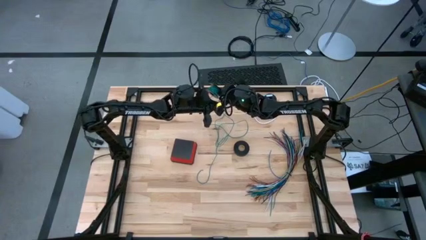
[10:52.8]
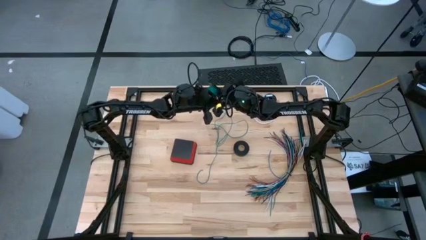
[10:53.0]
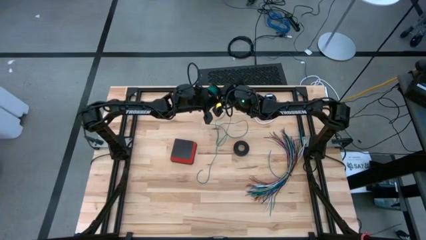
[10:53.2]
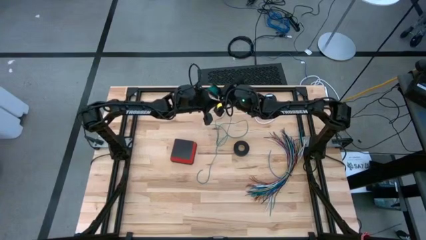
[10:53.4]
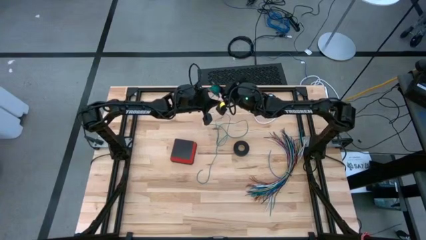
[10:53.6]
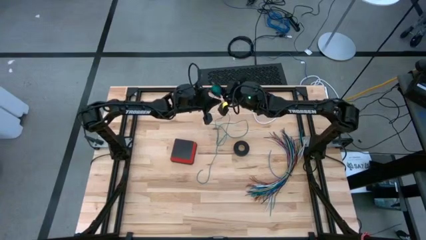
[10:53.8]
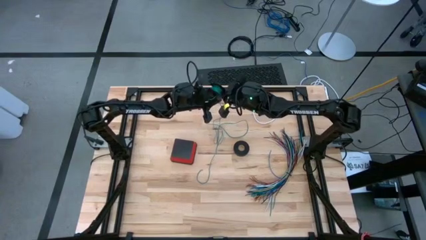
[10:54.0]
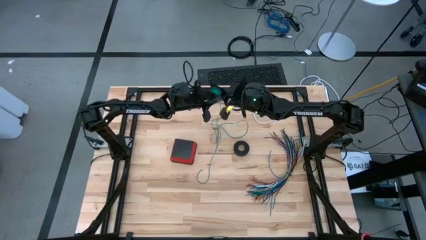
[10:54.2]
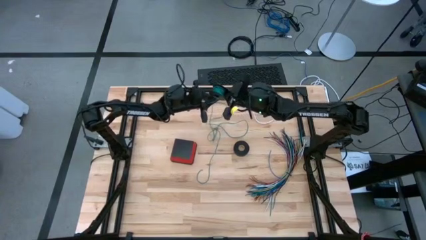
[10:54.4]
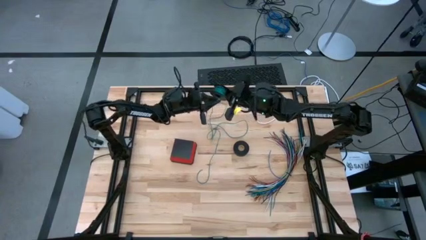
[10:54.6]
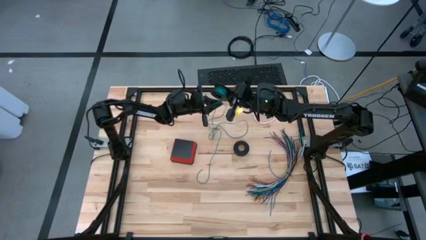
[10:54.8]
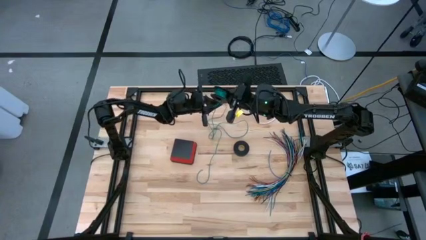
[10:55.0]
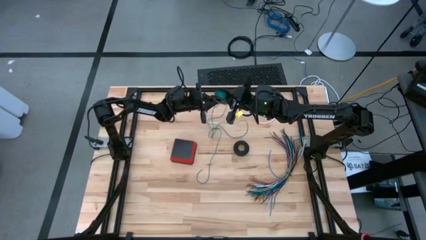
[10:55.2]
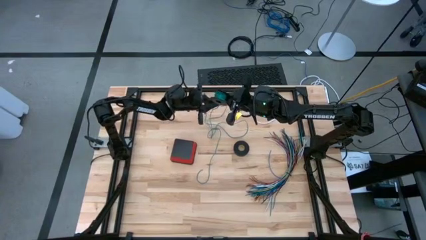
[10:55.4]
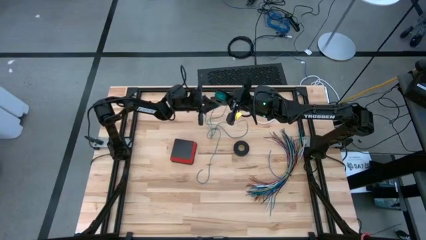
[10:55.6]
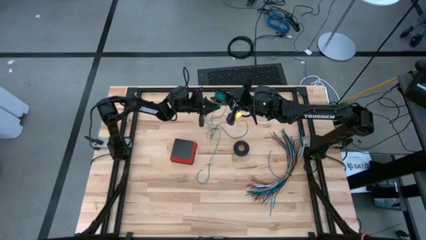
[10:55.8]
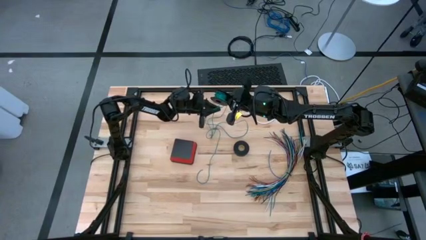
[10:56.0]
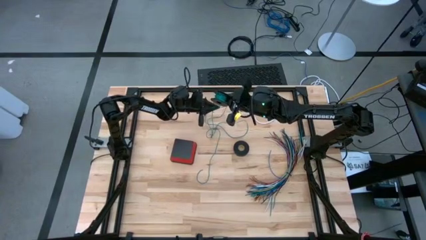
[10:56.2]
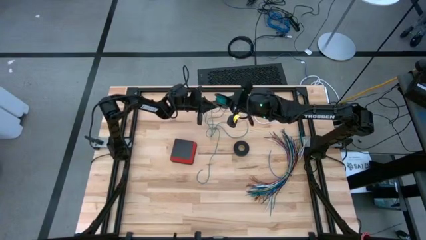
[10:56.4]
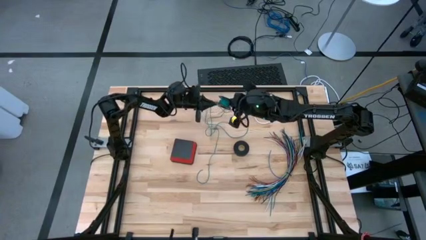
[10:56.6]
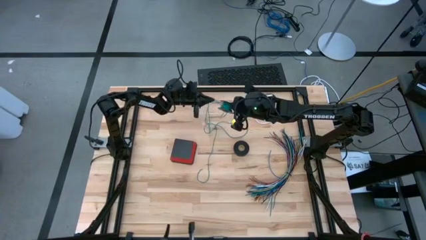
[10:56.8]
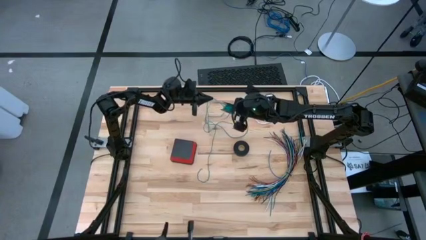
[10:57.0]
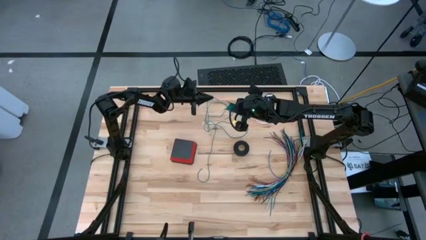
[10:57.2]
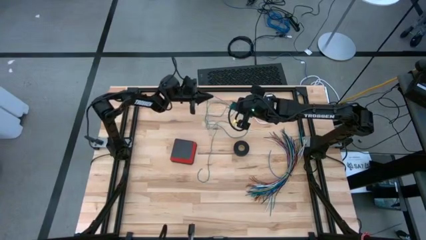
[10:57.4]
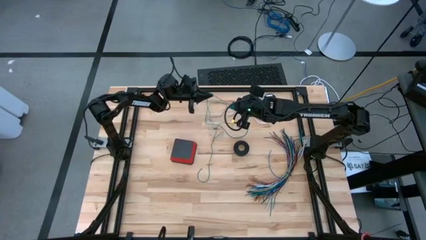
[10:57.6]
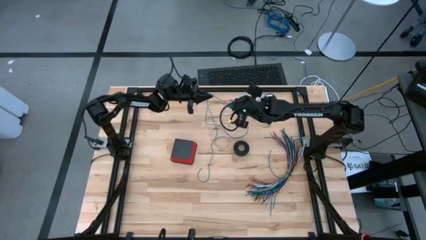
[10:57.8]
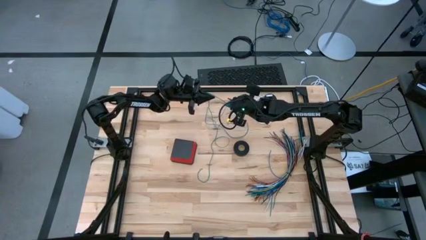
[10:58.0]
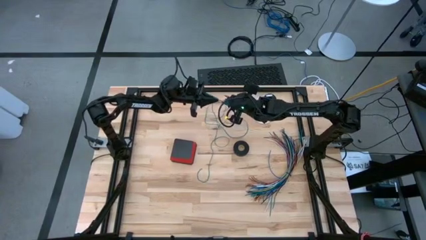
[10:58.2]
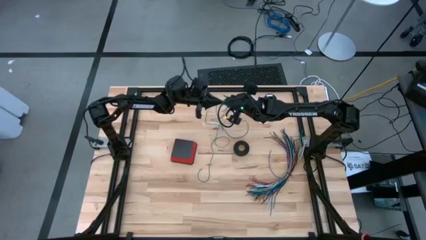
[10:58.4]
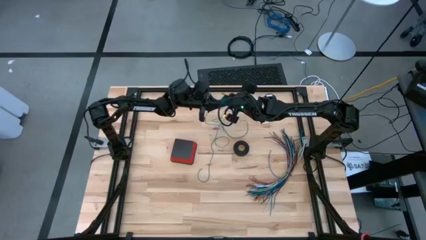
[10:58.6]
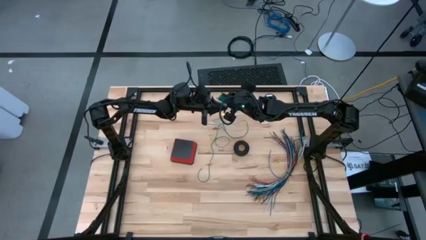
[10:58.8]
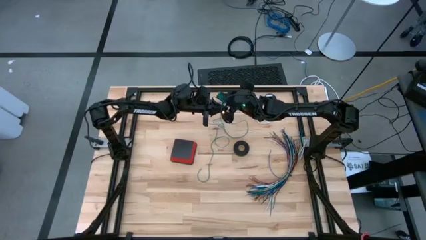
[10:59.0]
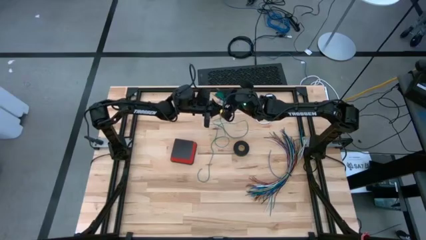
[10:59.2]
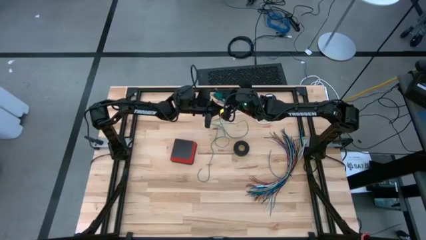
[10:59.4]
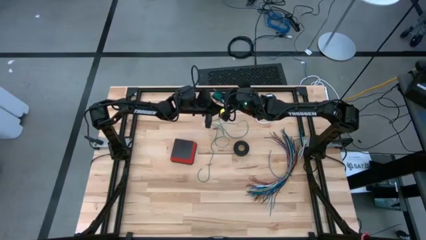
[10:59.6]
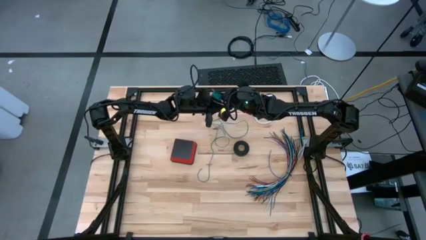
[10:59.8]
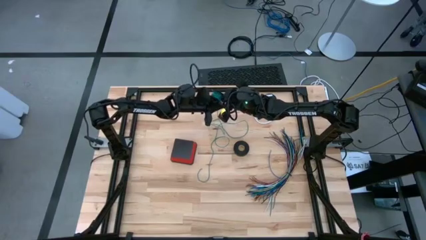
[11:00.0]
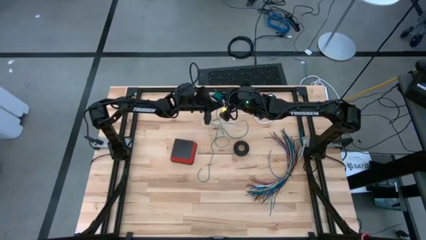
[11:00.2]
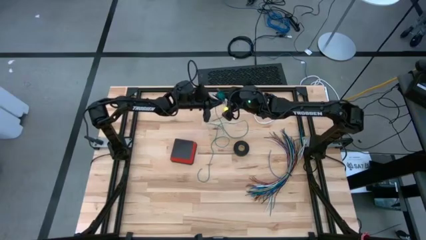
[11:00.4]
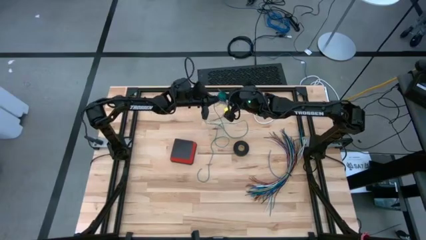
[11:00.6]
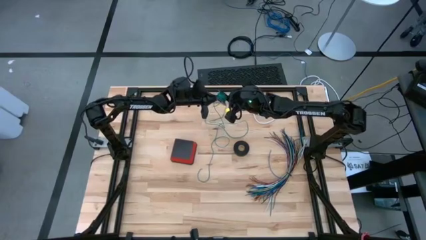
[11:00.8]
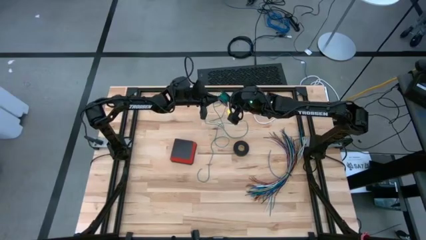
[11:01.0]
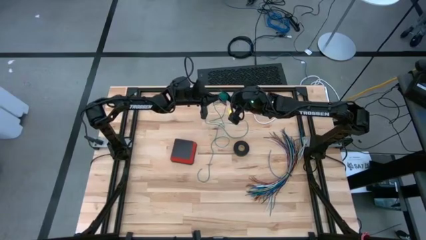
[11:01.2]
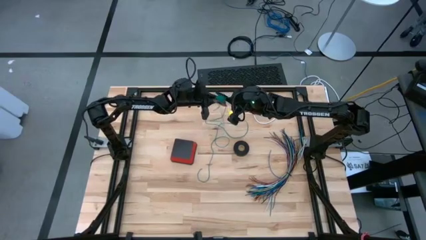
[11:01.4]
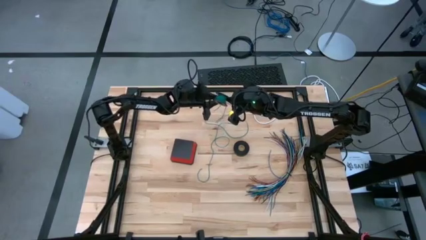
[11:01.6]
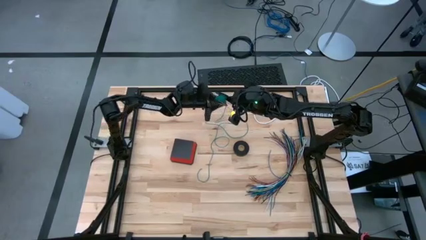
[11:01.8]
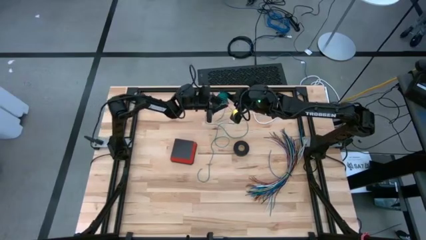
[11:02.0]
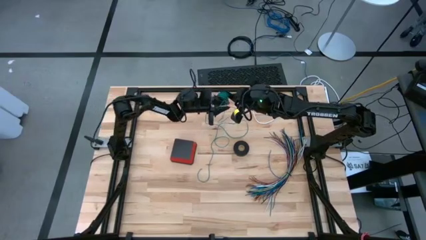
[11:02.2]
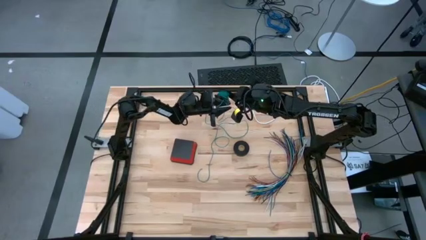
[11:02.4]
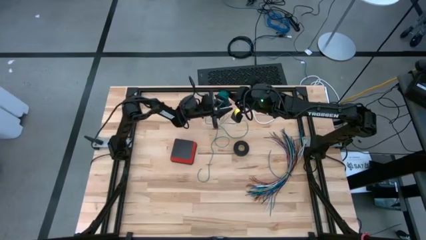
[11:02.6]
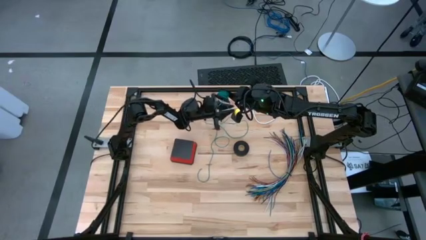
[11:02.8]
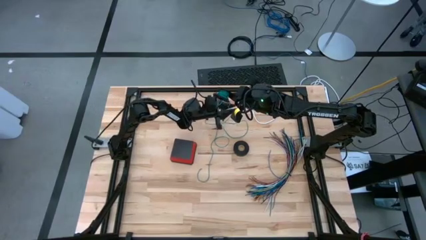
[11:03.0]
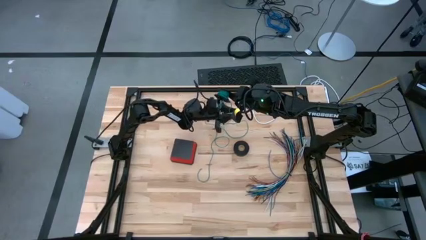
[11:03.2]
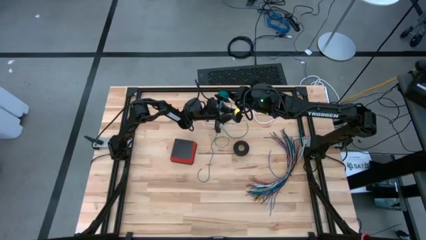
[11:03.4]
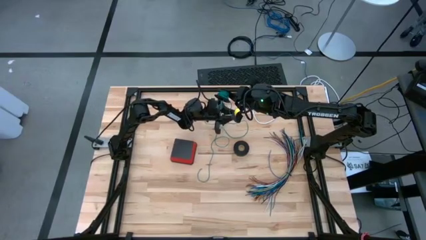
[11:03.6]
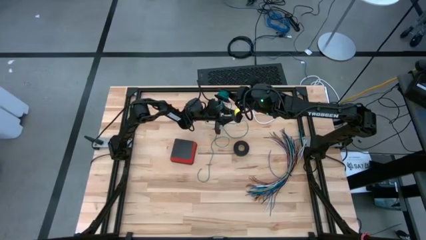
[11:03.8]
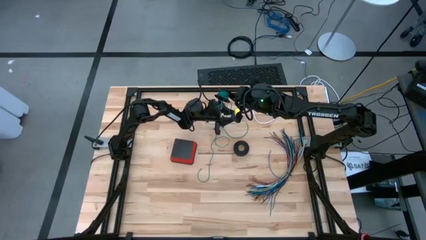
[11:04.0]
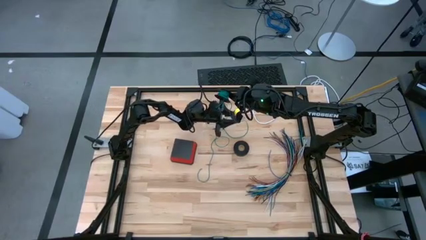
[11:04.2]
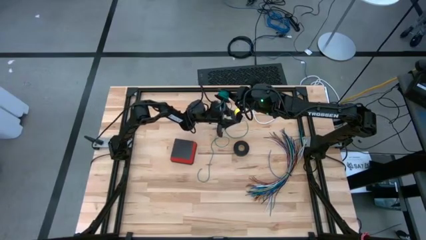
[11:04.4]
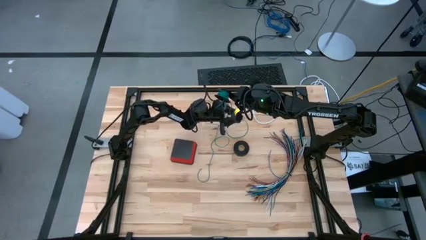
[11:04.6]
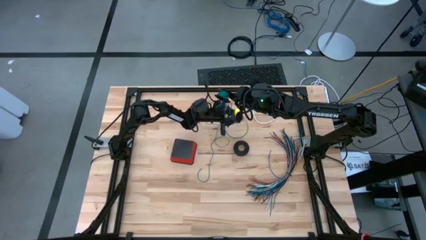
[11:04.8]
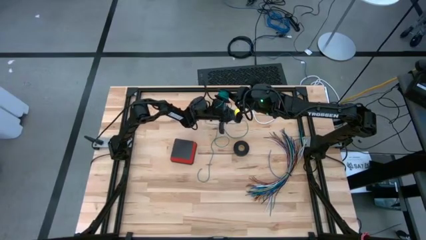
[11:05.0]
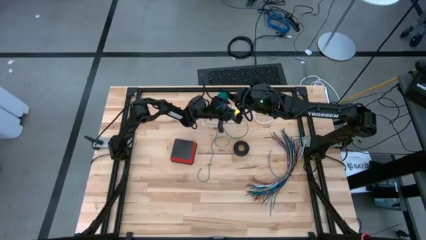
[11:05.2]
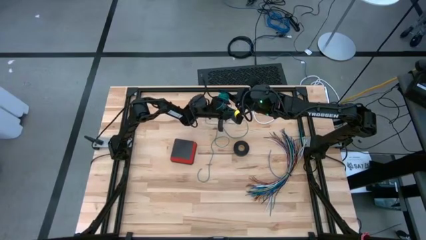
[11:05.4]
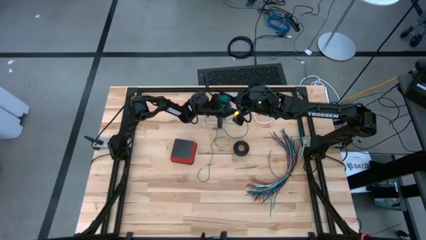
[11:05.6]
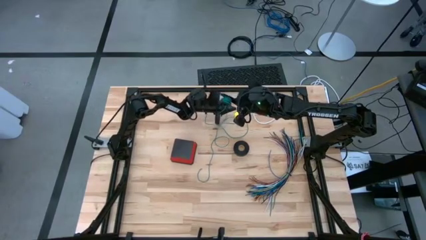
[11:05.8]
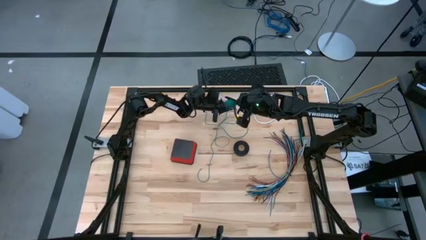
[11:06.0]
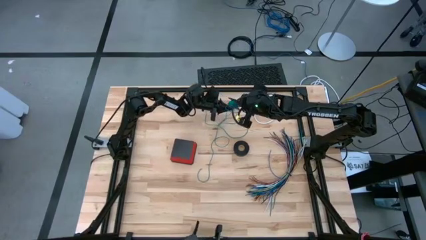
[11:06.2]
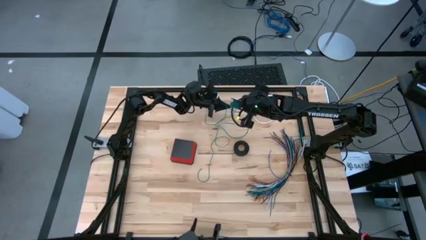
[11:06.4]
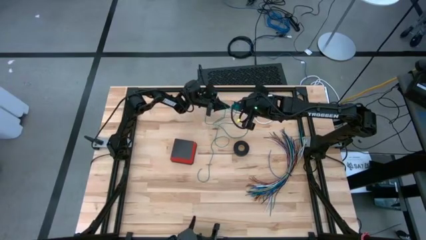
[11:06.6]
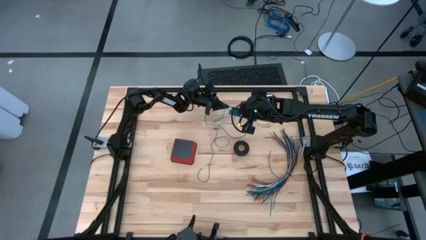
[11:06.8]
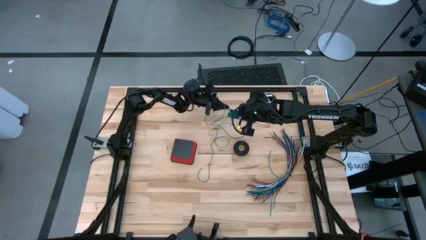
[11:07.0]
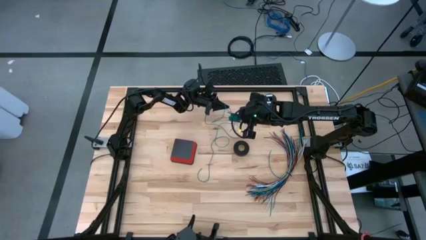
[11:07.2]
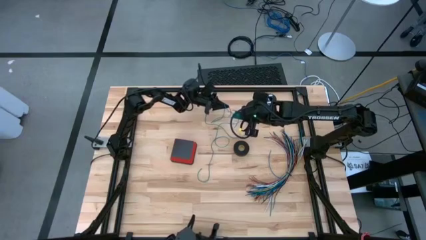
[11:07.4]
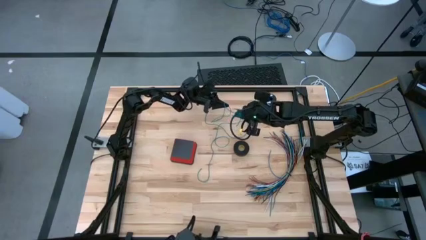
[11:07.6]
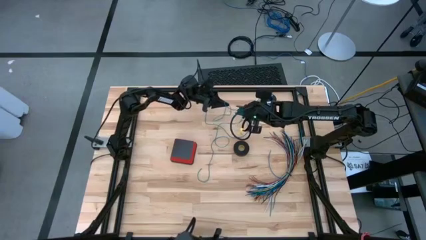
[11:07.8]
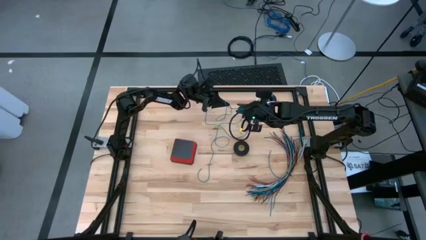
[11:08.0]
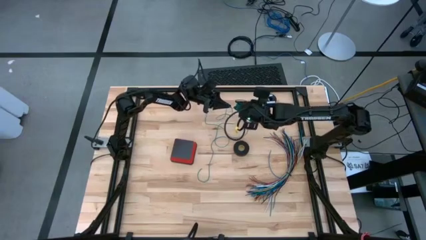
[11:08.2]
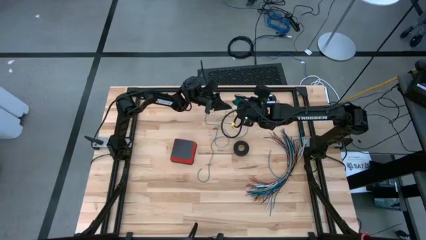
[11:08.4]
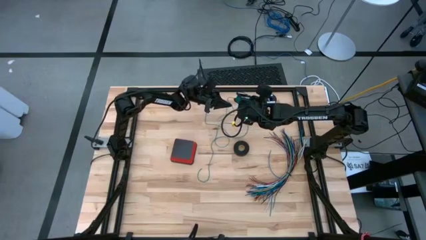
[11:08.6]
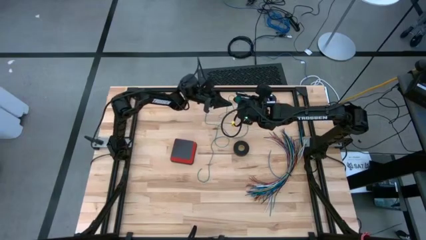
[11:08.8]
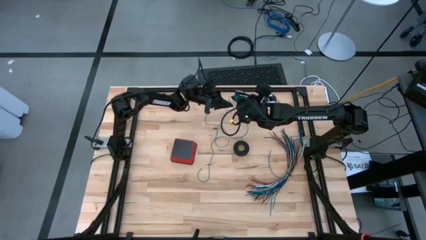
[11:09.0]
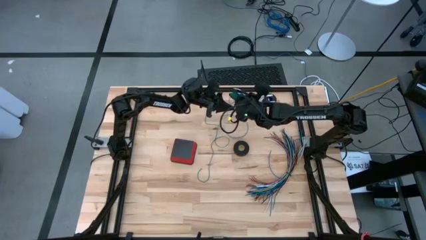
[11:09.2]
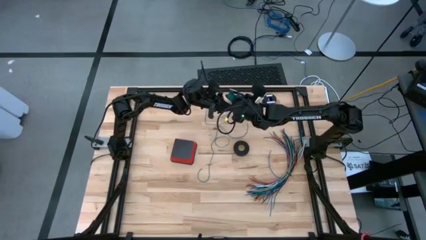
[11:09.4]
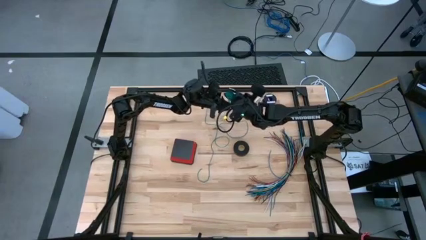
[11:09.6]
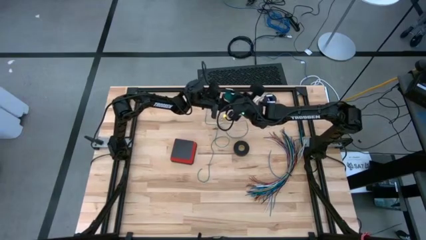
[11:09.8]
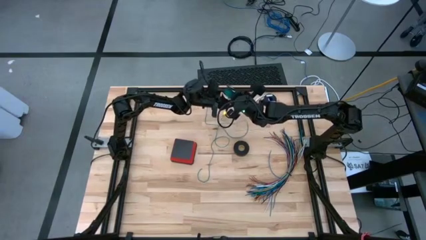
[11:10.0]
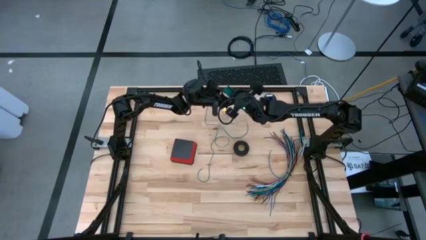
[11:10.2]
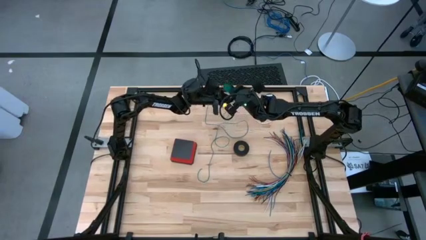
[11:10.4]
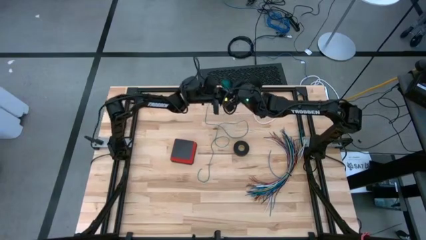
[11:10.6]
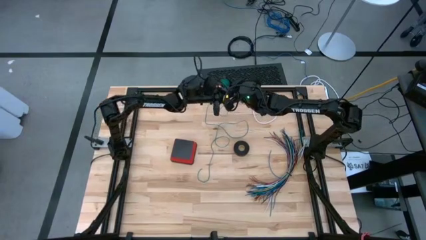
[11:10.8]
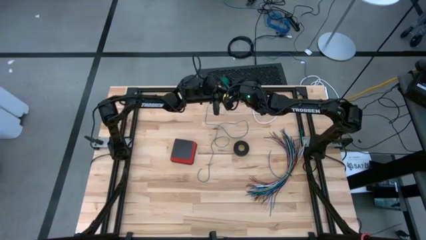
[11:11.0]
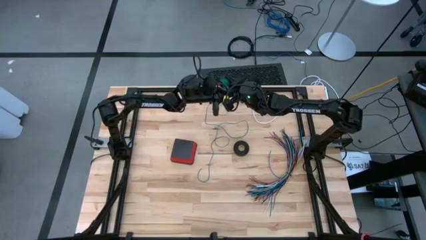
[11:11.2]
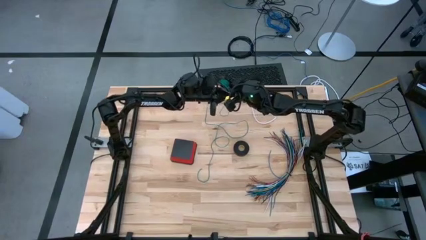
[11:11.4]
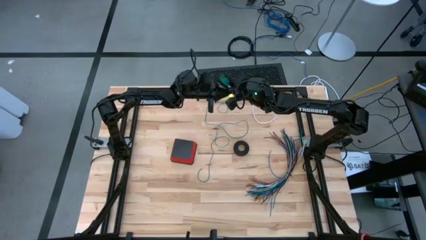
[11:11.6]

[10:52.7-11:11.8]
Task: Coiling cords
Coil the green wire cable on the spool
